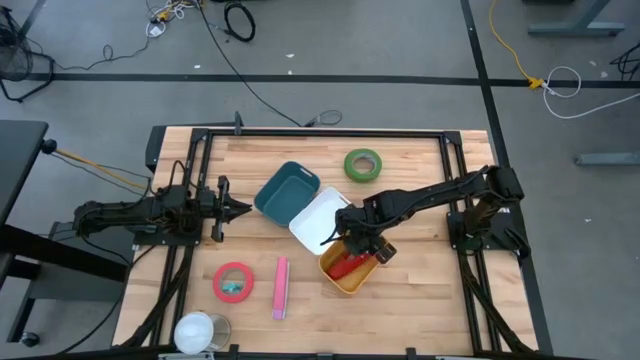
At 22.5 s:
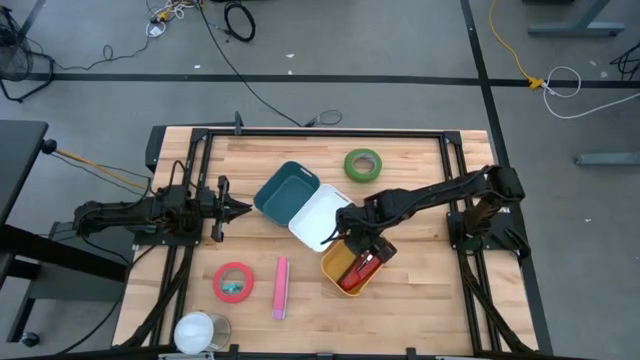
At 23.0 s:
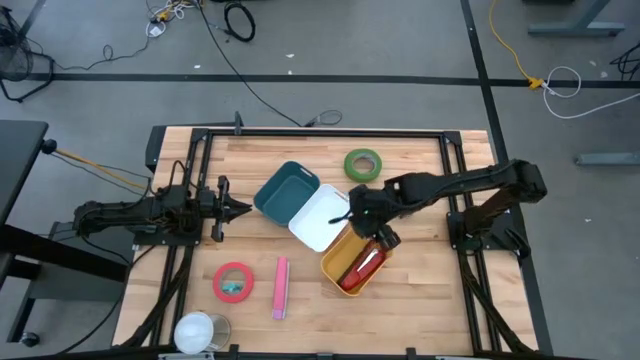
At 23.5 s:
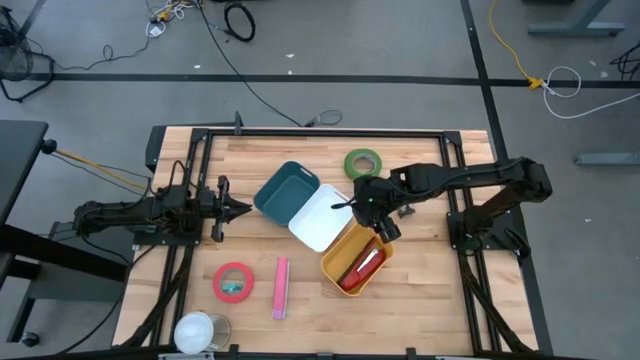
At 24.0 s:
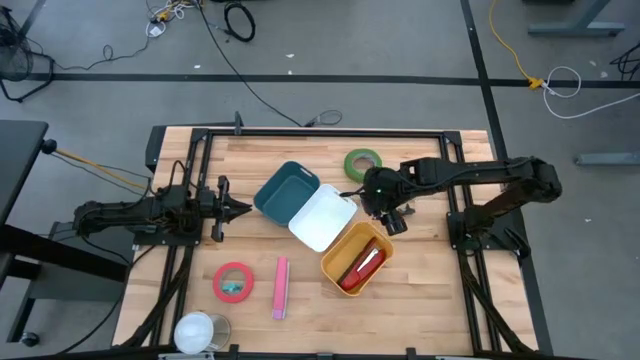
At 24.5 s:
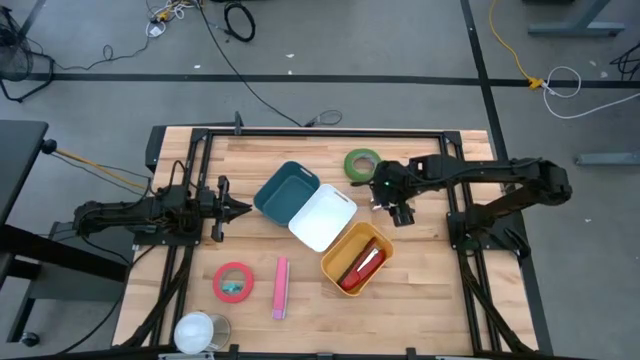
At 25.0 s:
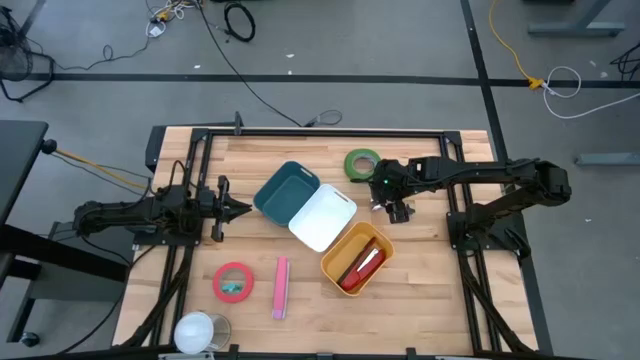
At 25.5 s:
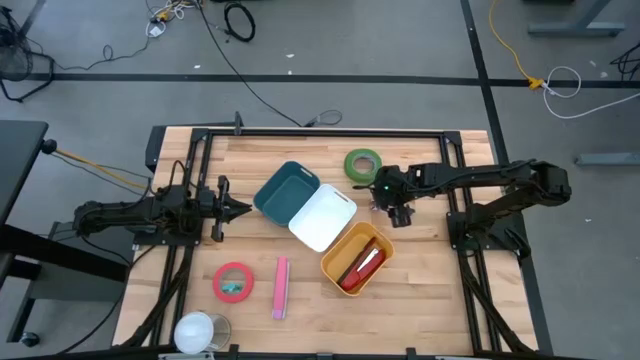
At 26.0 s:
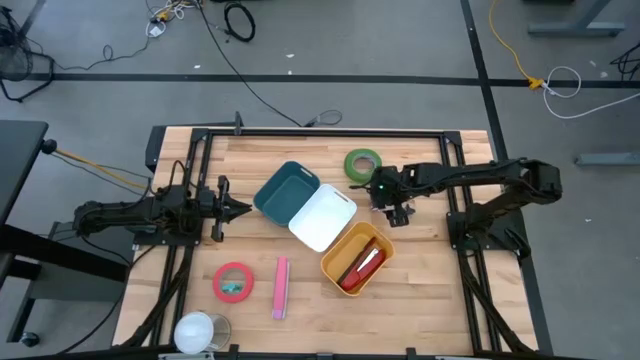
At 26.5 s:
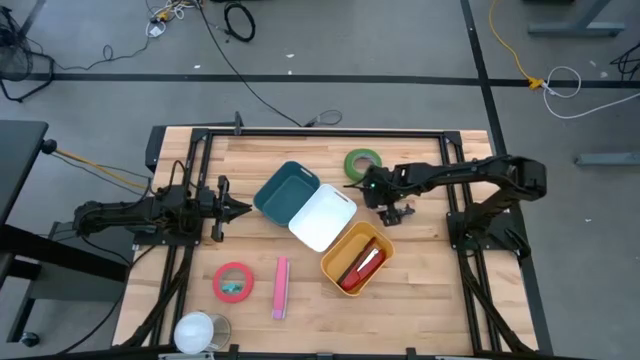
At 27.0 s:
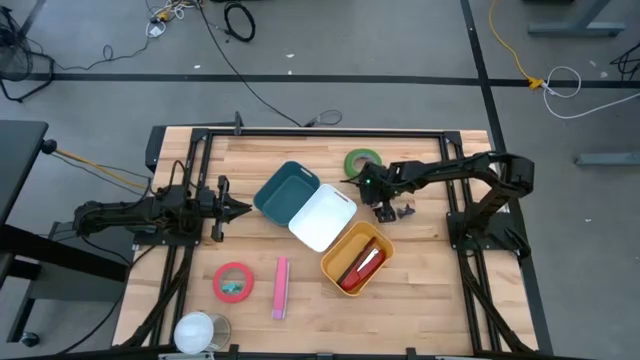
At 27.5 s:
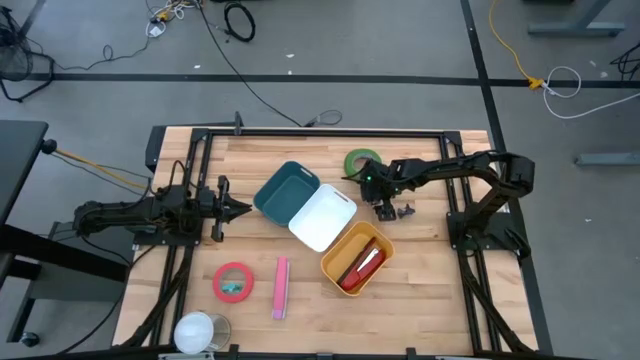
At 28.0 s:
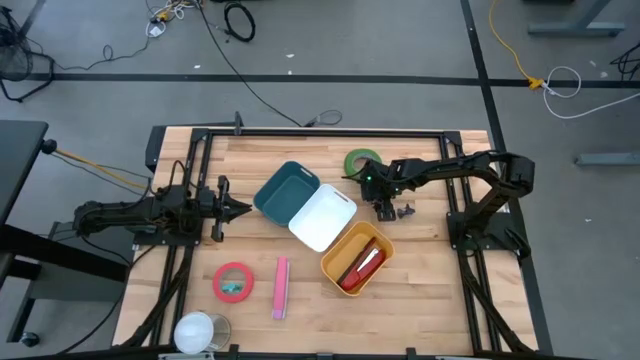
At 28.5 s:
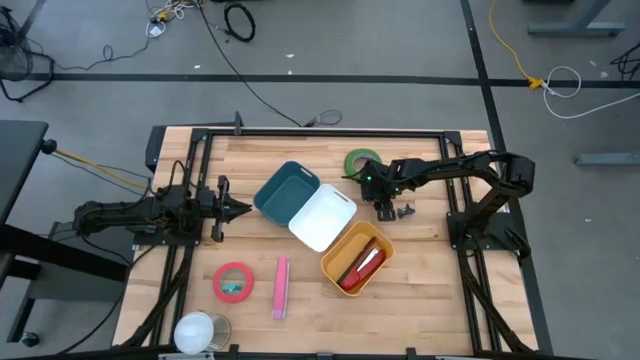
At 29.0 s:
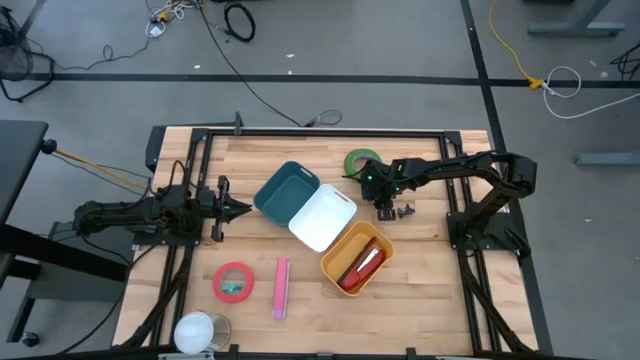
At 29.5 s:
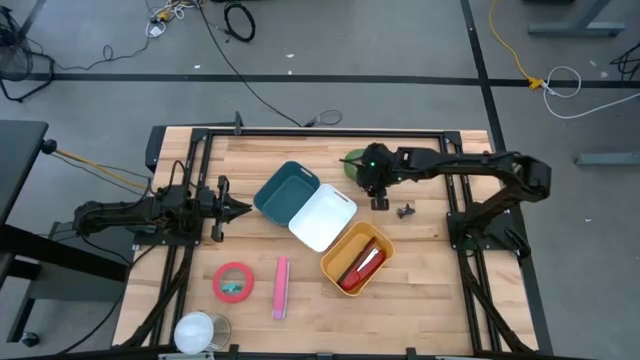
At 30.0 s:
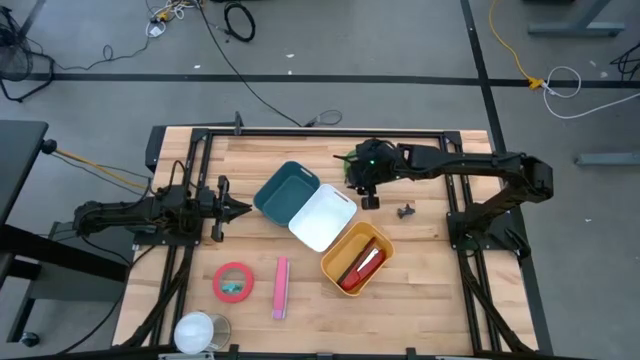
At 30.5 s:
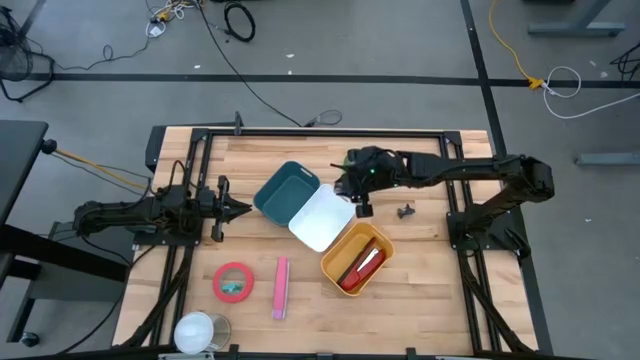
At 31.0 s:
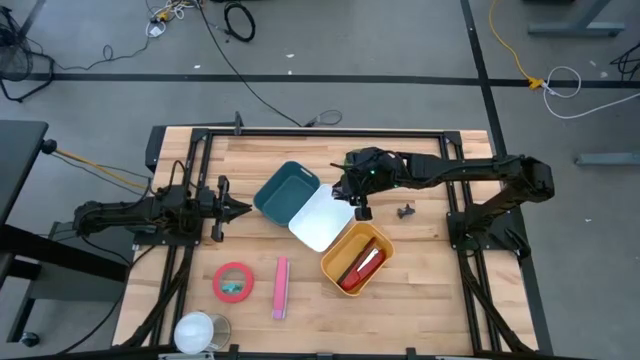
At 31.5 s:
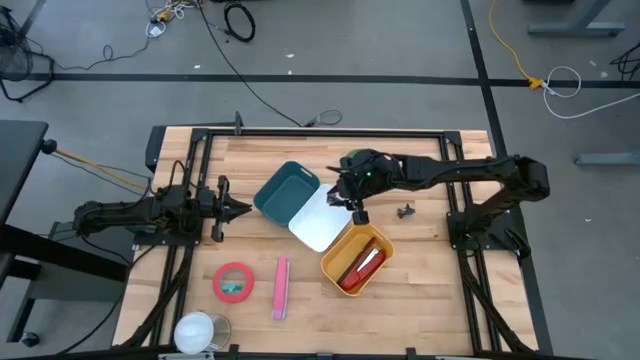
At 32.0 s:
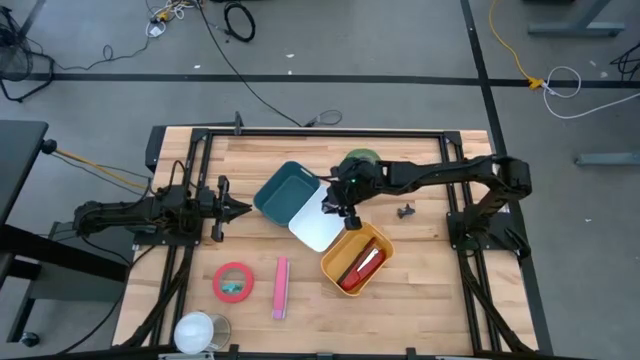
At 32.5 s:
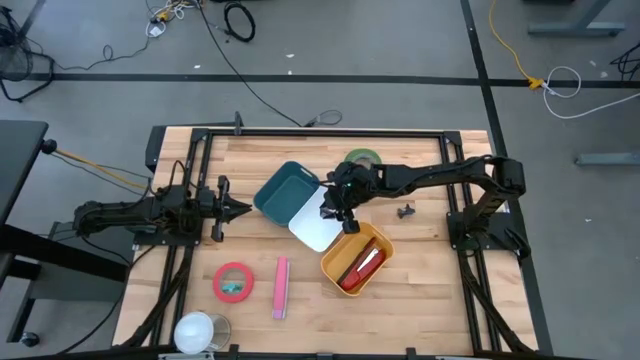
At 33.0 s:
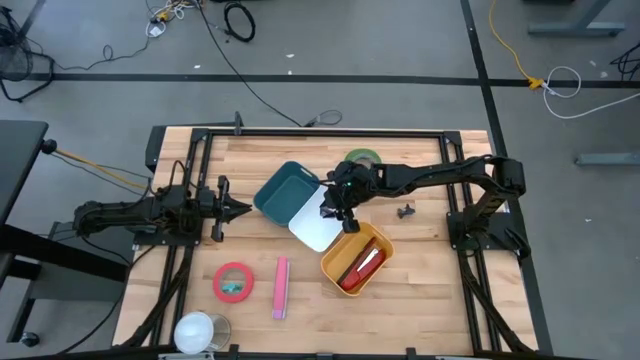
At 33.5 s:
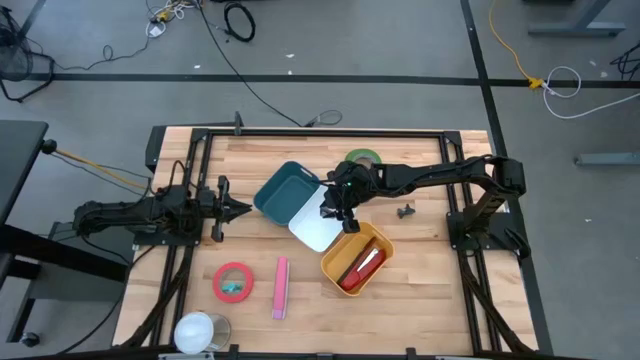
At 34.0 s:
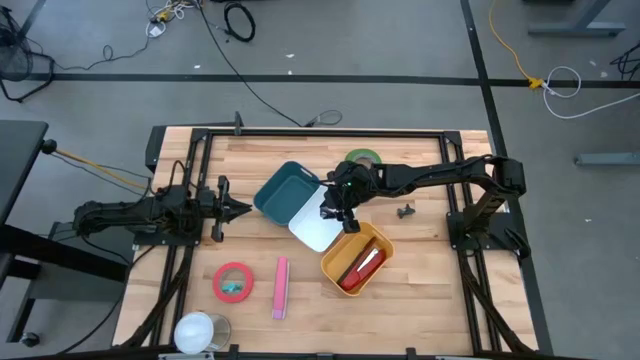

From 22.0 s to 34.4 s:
Task: Pick and place Stapler, Stapler remover, tape
Put the purple staple remover into the white bin

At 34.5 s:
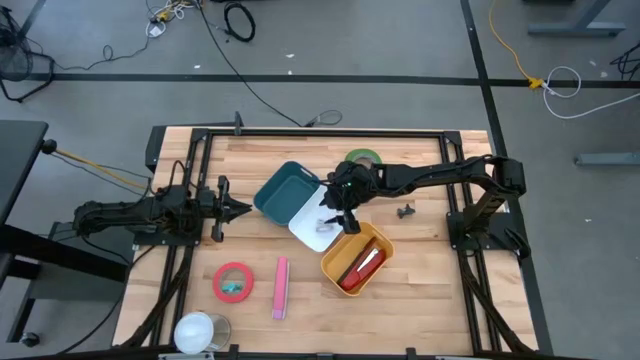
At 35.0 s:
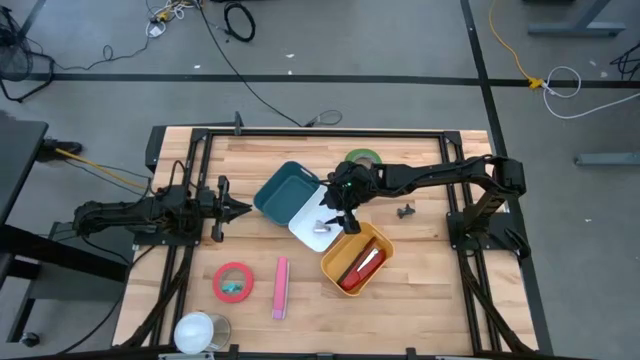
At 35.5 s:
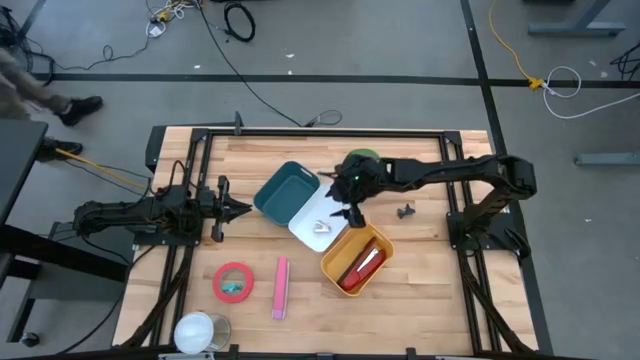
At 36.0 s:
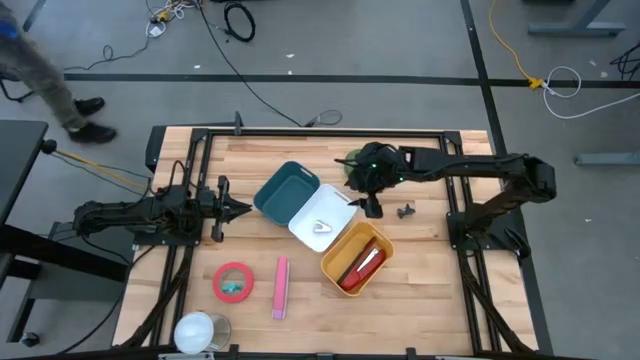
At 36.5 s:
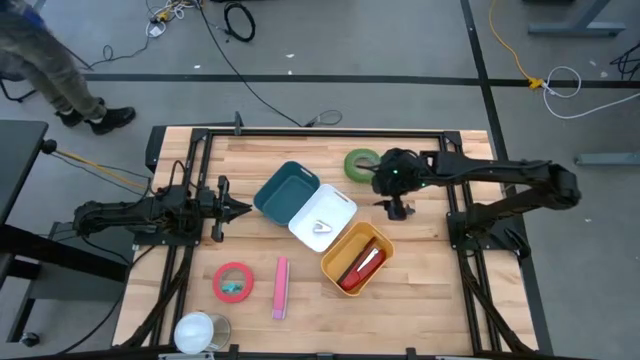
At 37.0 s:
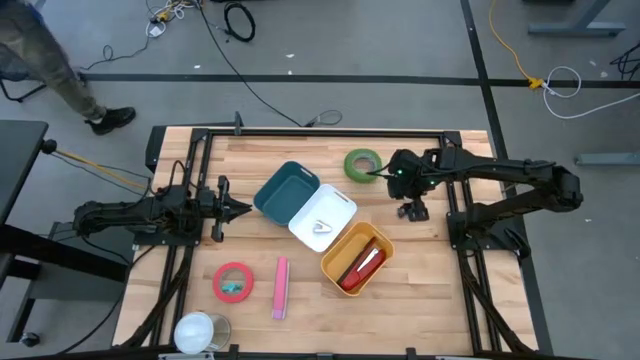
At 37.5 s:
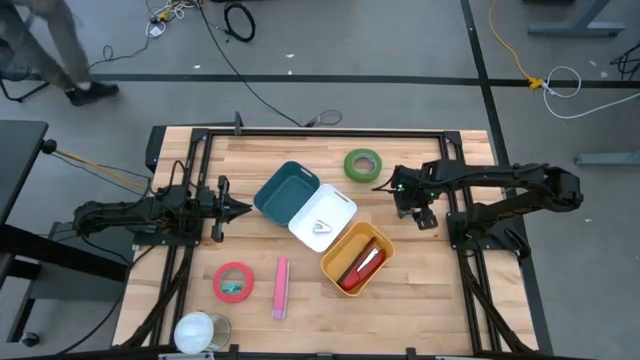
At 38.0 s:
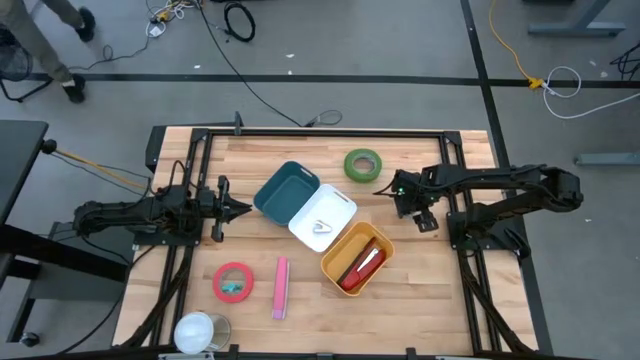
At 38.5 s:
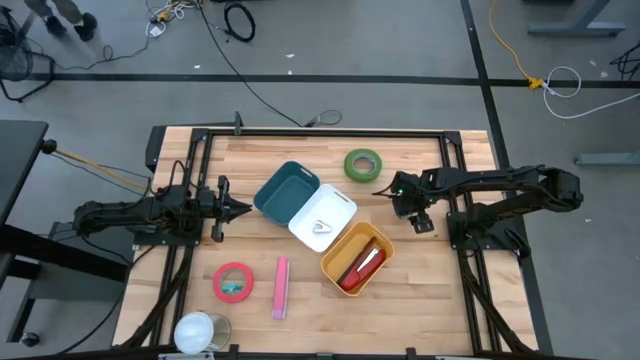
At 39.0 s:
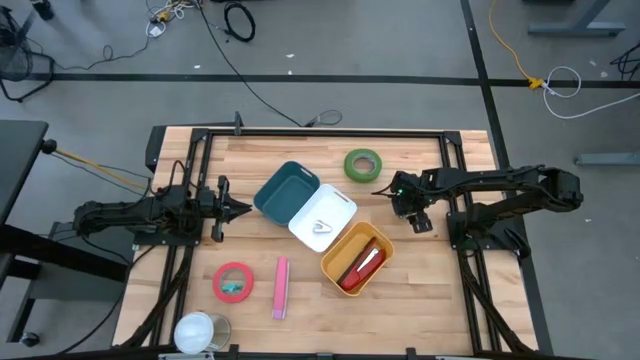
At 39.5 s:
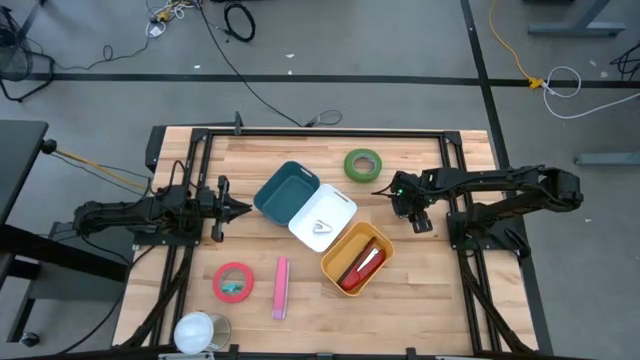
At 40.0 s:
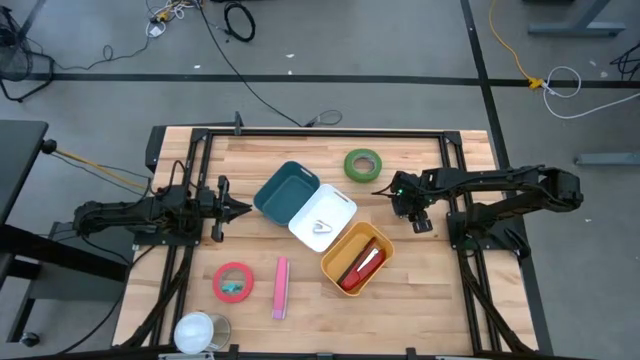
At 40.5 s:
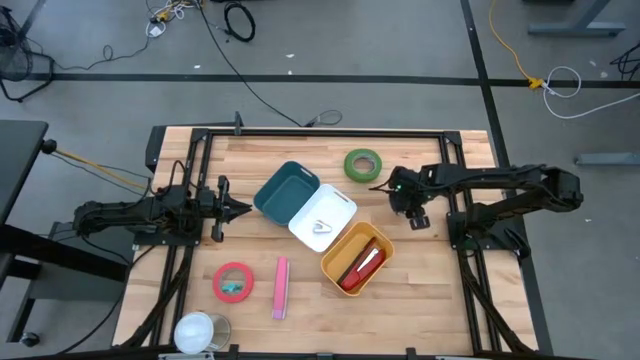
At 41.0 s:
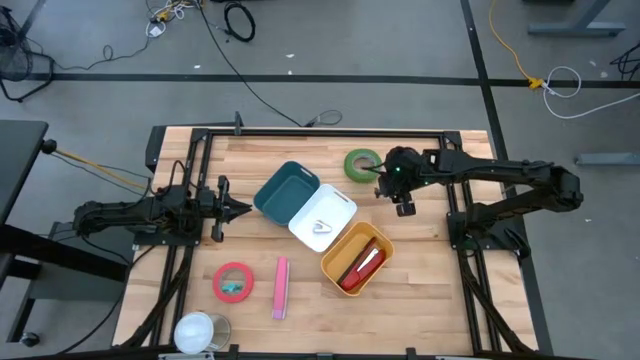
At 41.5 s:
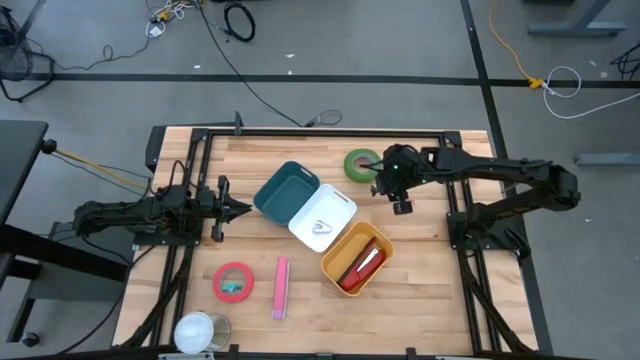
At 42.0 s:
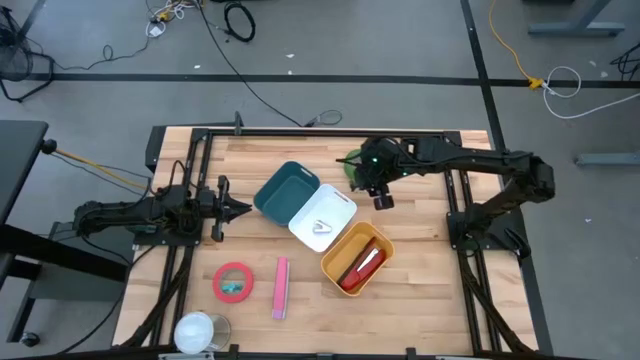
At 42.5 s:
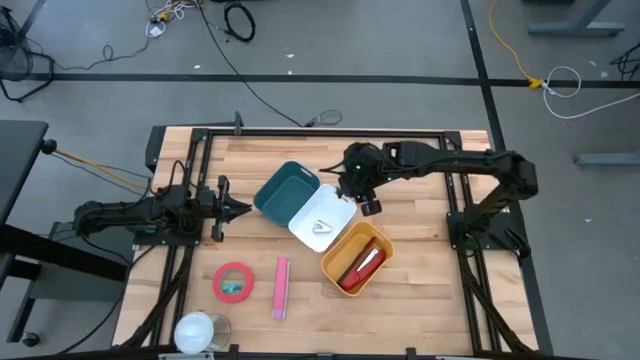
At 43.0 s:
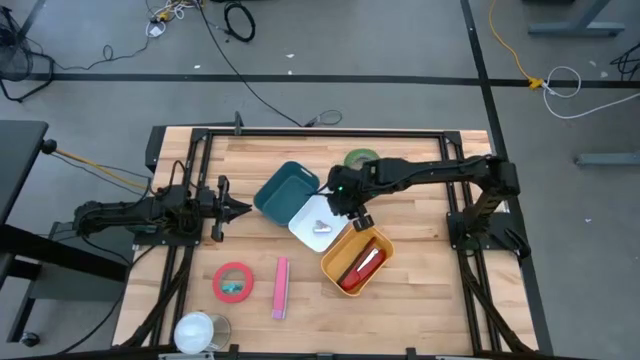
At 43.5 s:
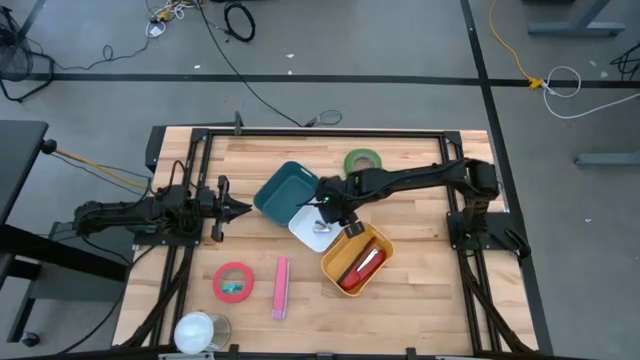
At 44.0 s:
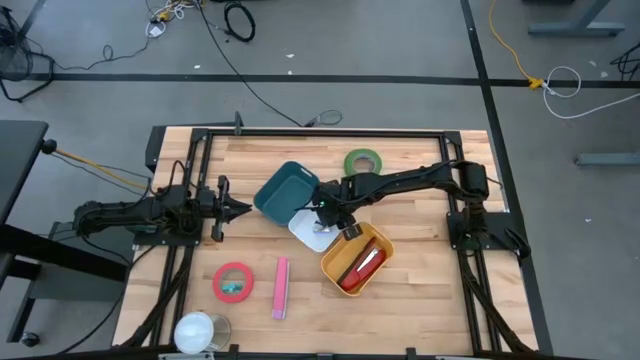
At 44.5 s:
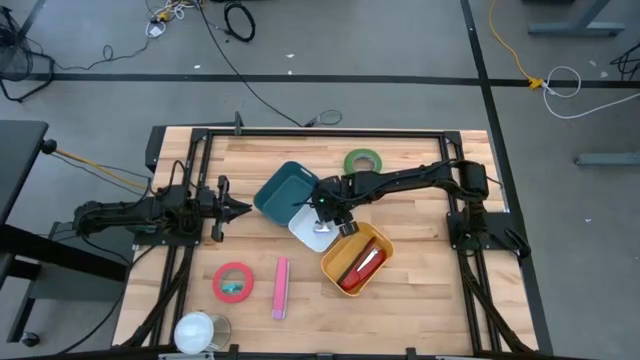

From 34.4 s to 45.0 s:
Put the black staple remover into the white bin
